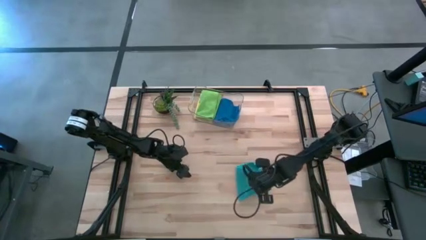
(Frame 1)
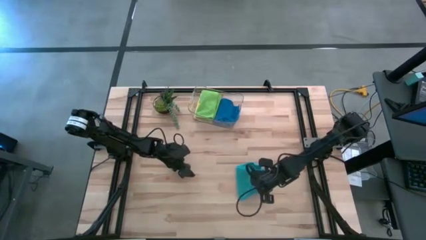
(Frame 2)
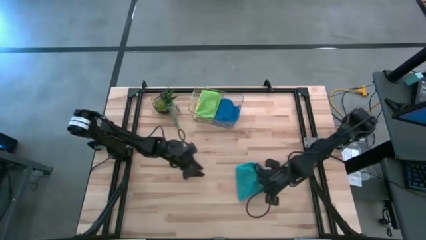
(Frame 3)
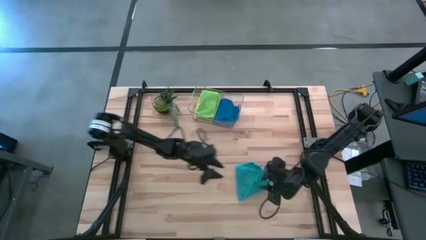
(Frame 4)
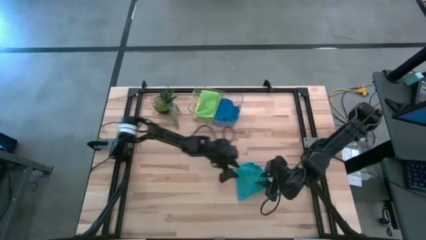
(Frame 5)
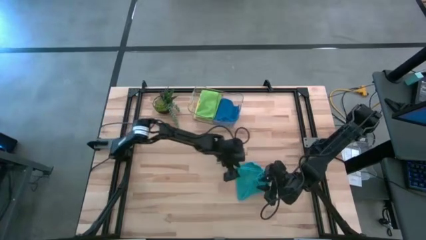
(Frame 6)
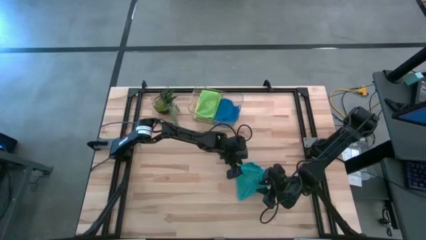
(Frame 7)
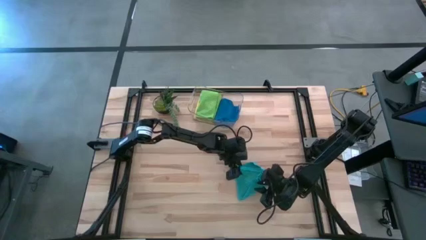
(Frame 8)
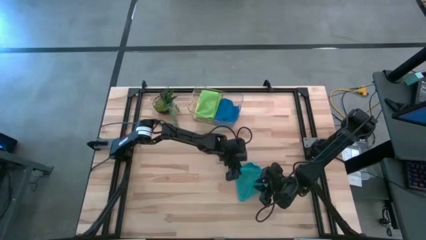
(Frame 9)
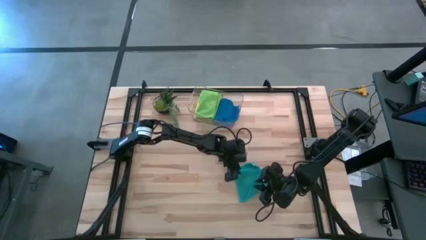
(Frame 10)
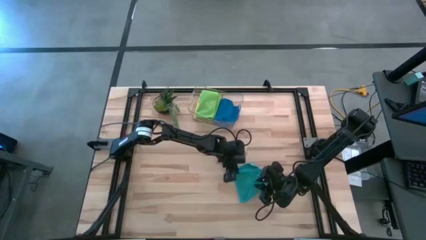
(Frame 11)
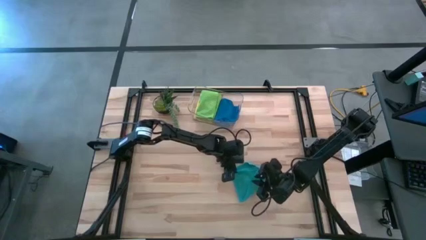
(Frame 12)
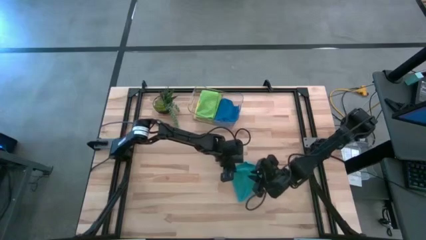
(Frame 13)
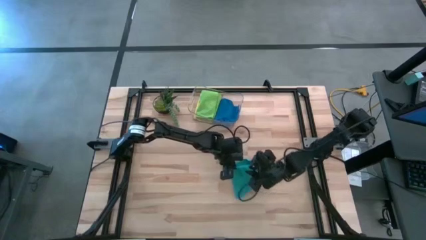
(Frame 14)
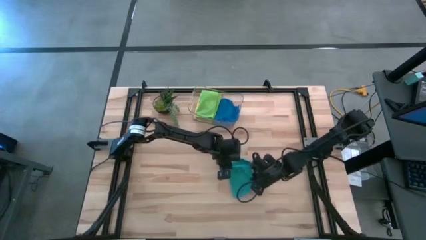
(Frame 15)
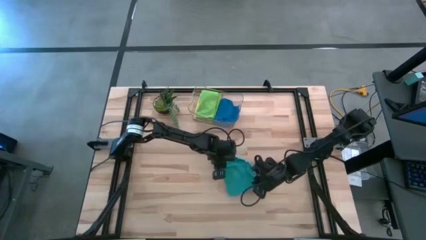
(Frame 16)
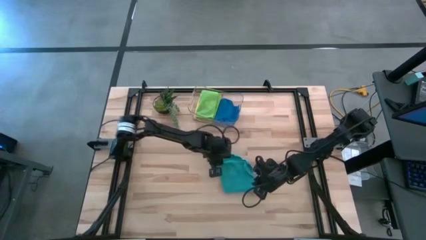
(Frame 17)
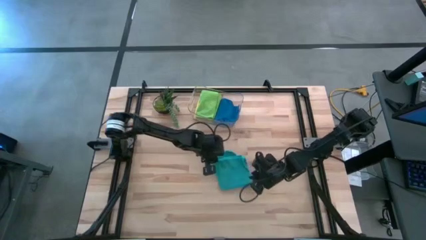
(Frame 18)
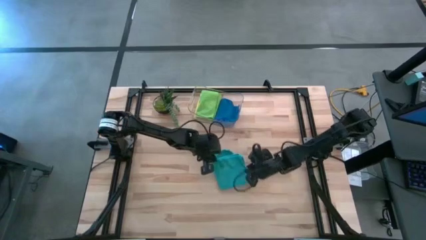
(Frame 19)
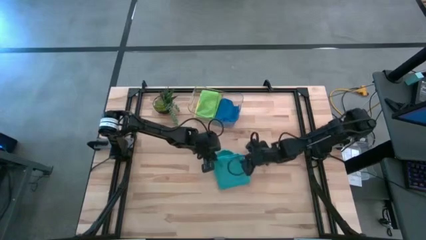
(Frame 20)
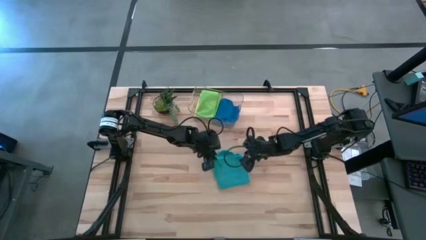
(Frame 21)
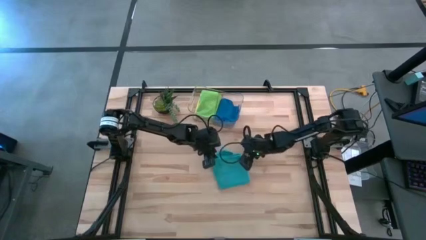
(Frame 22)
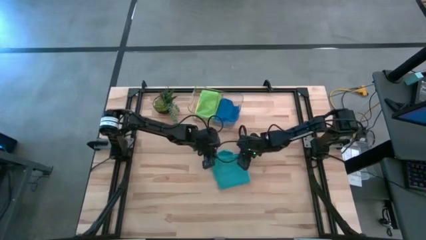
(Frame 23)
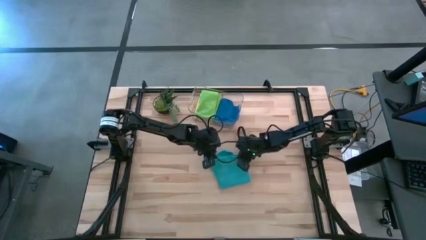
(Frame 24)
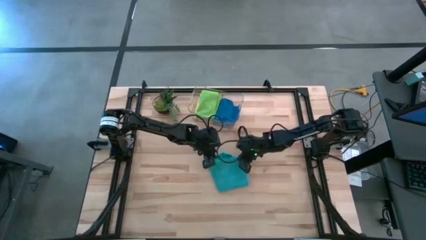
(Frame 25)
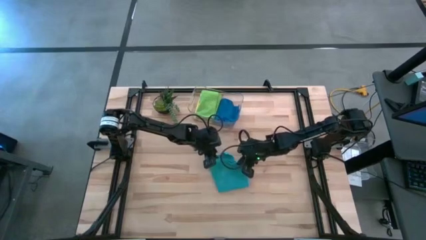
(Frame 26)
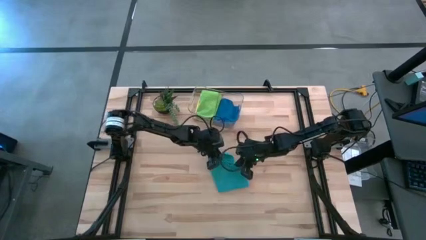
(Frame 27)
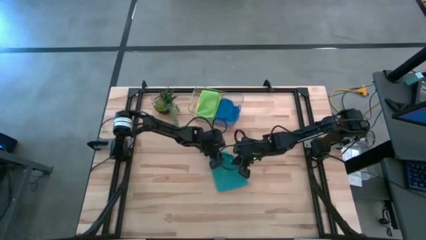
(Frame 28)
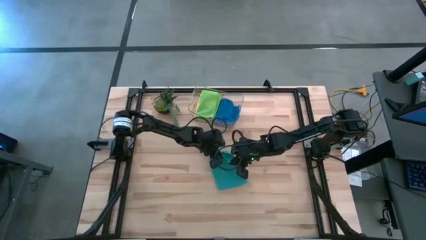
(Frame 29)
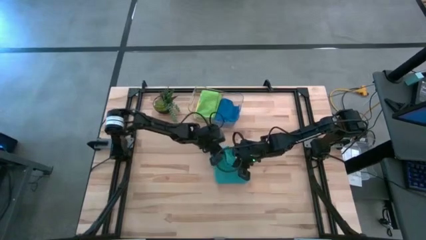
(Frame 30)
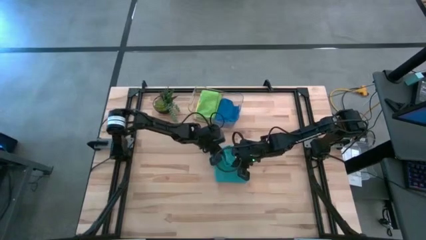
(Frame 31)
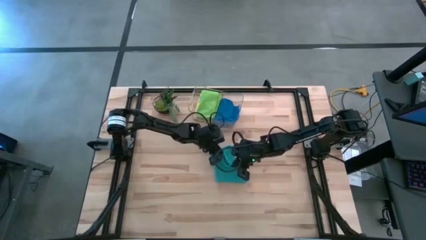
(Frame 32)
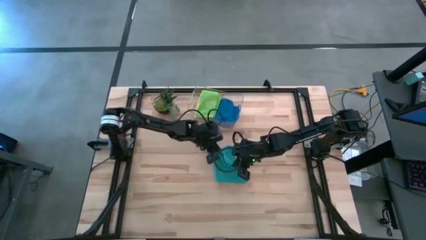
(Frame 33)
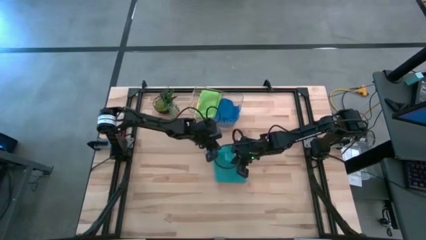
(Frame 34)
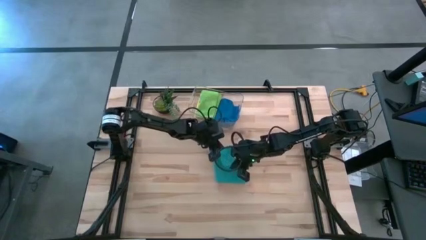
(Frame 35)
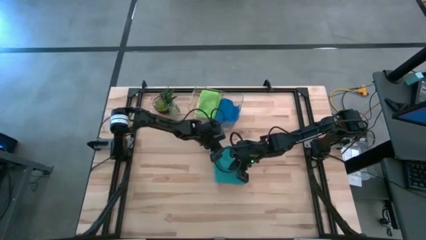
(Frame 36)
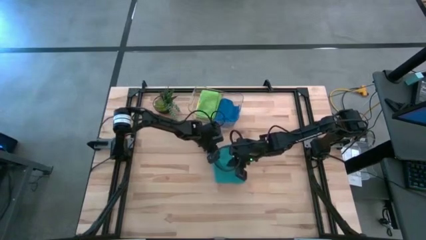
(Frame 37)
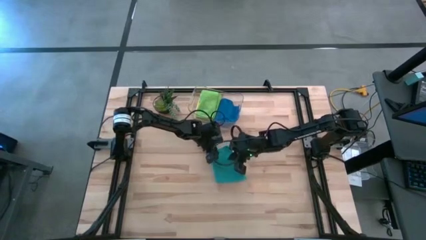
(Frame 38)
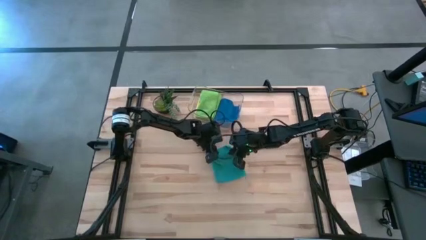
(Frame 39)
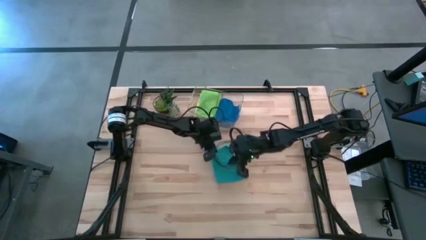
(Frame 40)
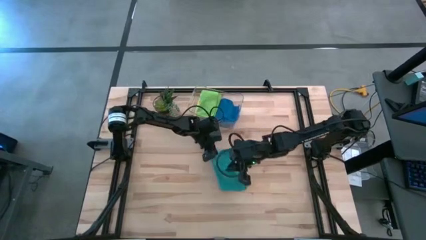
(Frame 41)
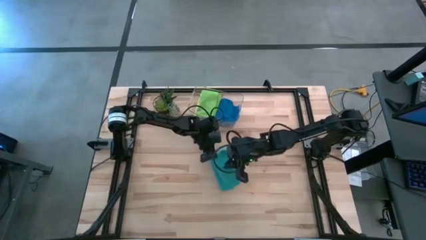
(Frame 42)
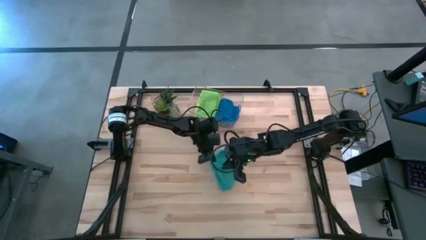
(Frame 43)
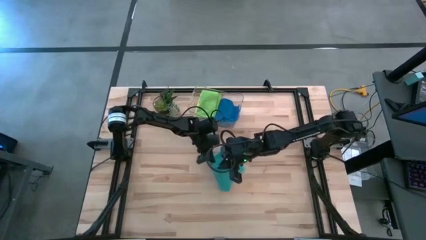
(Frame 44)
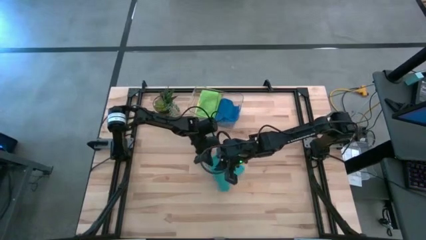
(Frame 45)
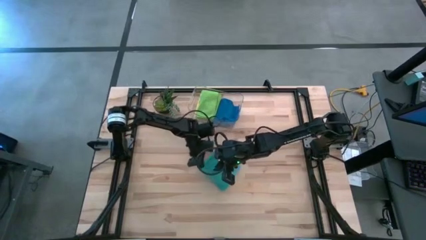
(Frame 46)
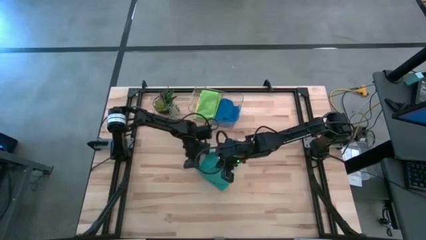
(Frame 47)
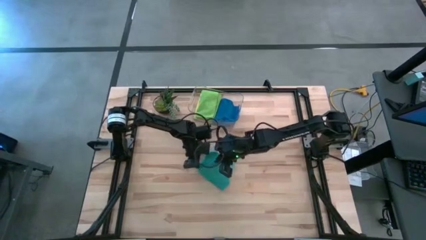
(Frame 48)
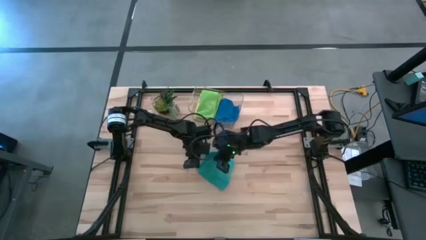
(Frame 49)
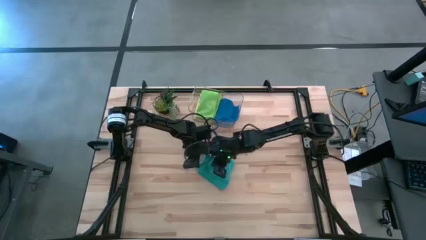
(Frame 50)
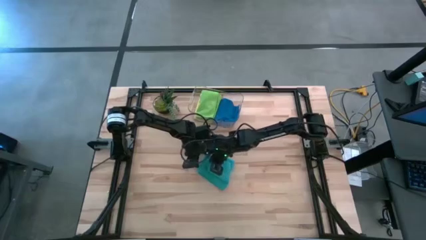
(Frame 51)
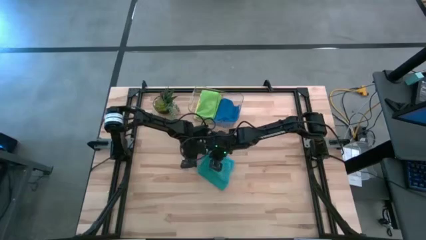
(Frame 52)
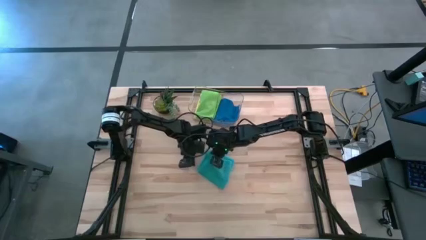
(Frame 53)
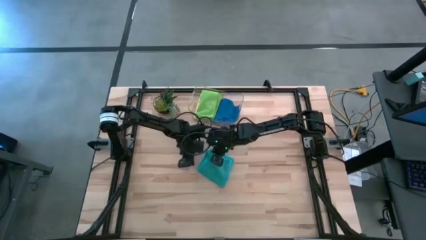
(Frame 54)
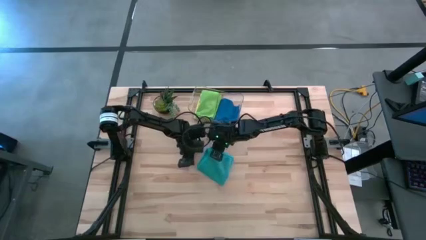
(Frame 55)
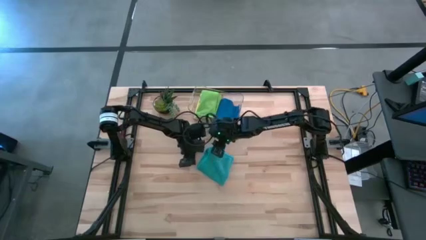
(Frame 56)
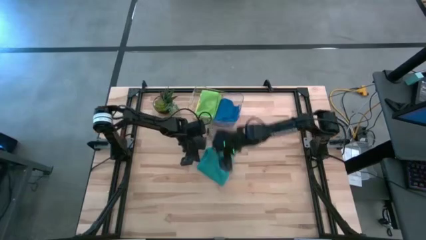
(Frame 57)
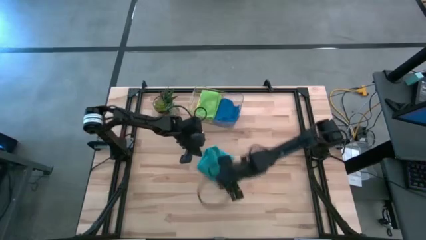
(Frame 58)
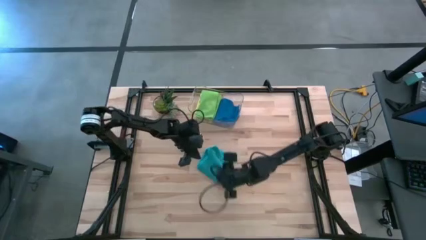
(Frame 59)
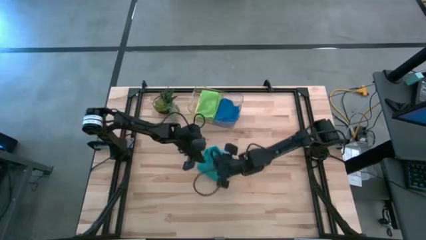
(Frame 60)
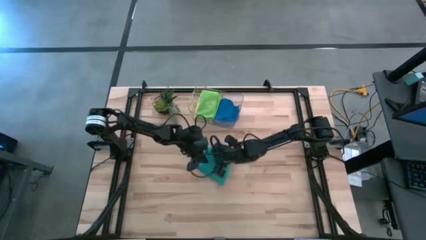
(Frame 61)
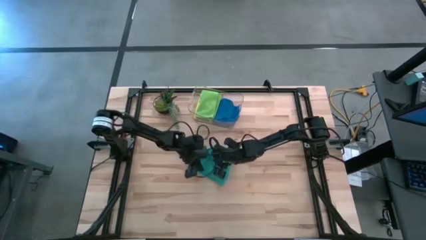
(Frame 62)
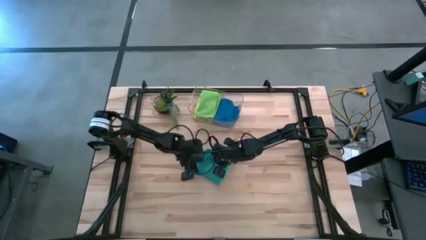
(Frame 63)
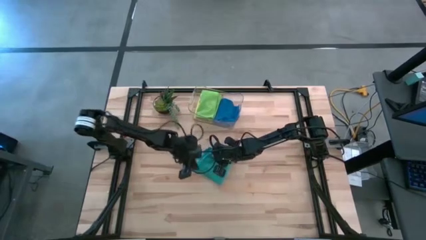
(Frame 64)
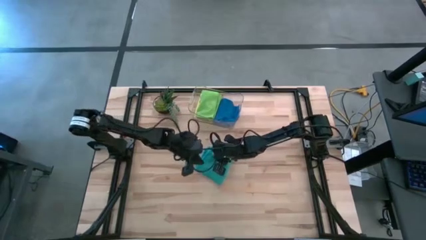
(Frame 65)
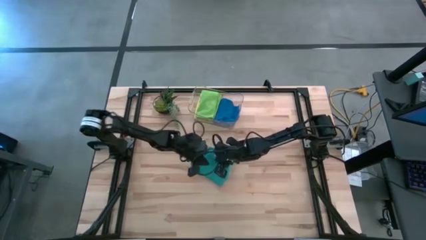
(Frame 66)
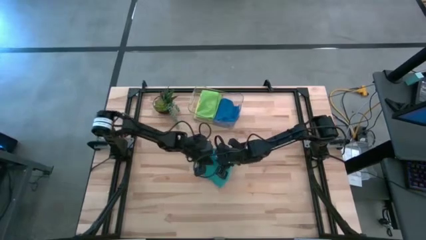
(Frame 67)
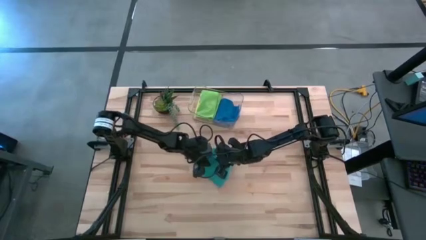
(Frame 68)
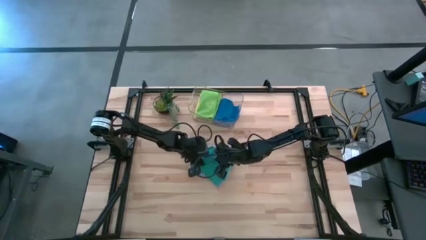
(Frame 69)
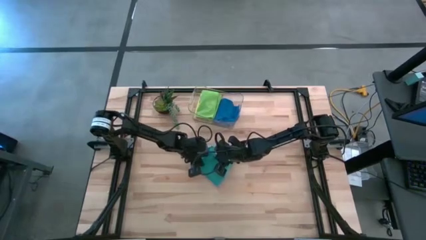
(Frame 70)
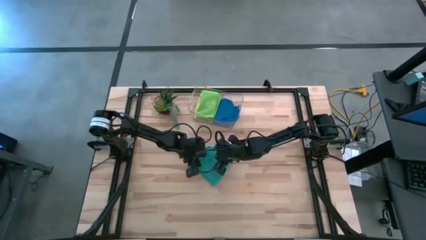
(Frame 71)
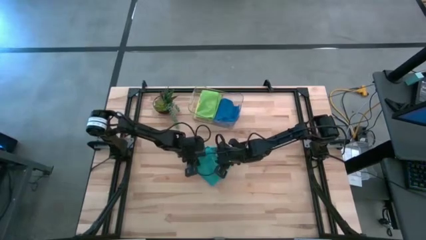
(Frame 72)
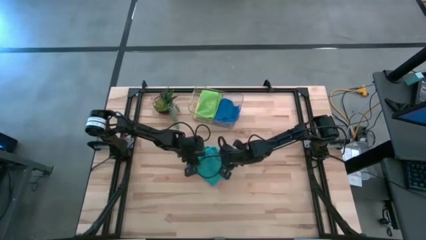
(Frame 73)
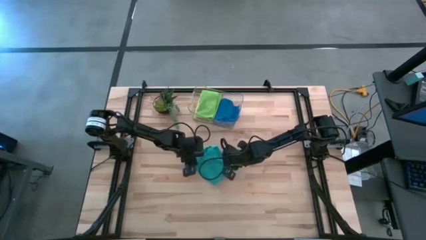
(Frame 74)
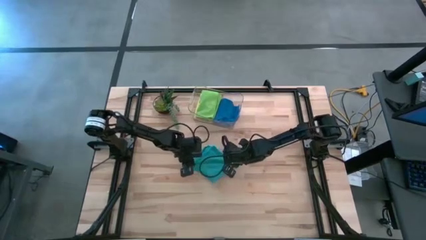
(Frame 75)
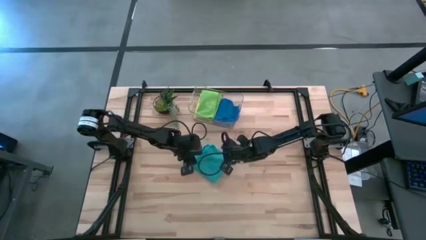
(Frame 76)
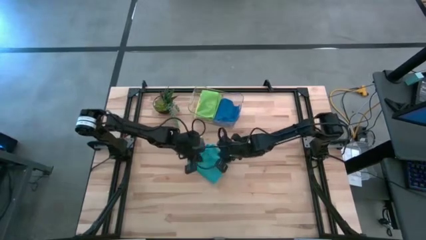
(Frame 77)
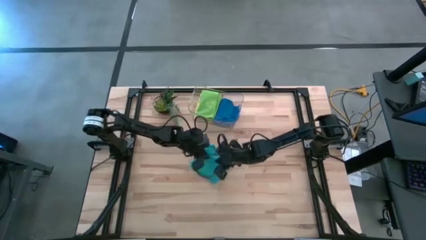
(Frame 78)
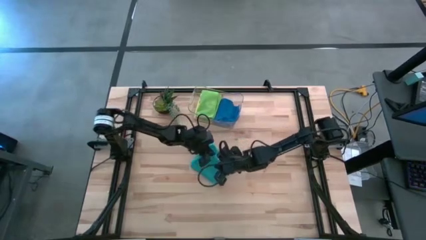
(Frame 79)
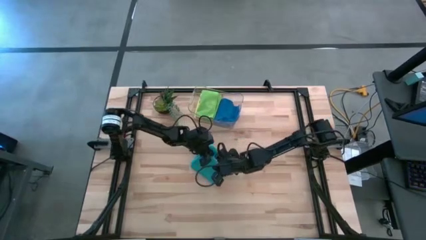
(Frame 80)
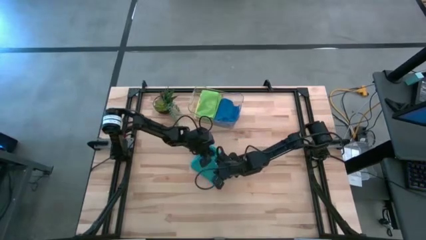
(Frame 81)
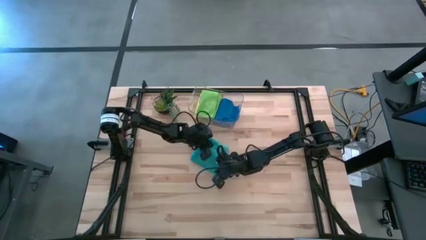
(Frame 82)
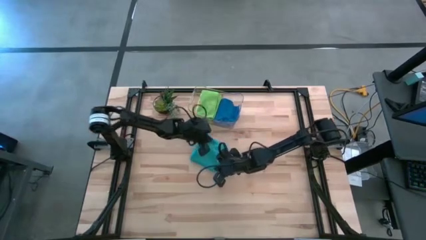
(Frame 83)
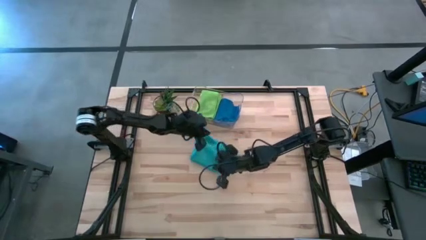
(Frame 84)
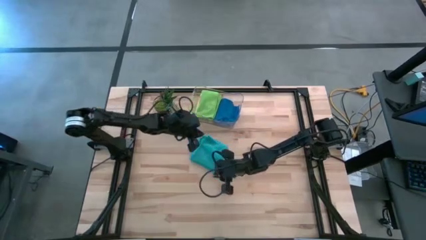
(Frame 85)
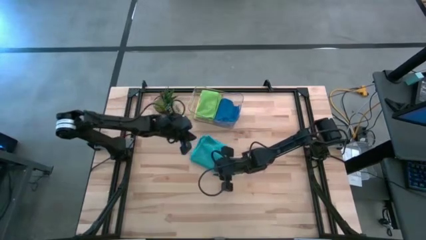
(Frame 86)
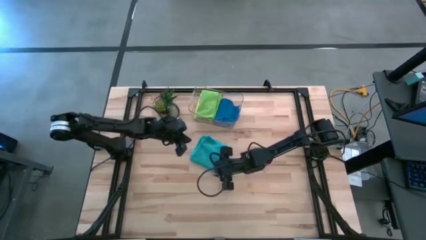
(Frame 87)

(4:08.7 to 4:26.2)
Task: Fold microfiber towels
Fold the blue towel
